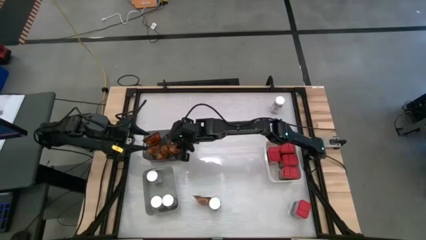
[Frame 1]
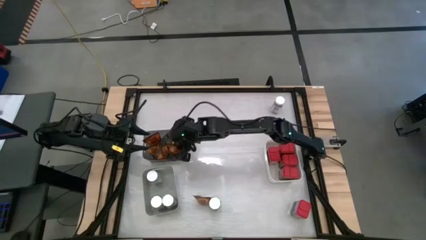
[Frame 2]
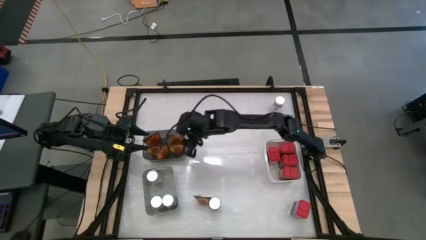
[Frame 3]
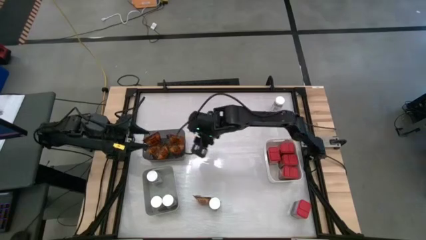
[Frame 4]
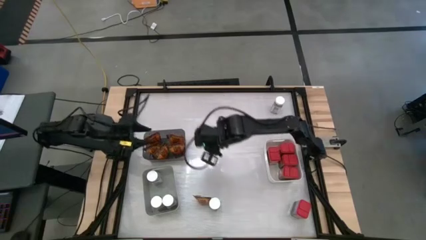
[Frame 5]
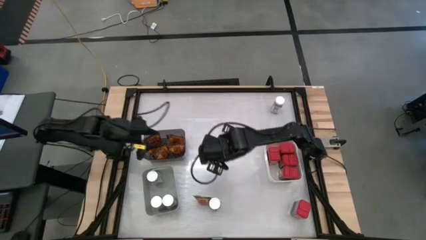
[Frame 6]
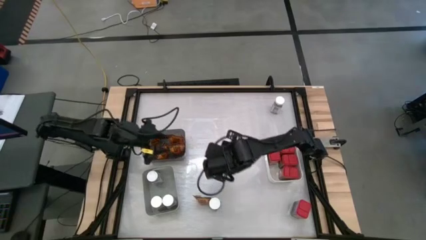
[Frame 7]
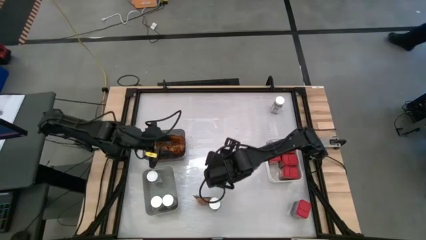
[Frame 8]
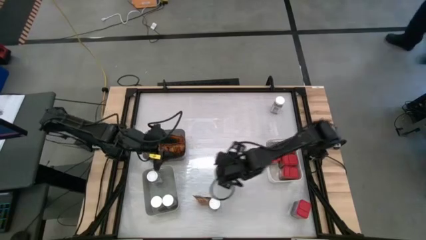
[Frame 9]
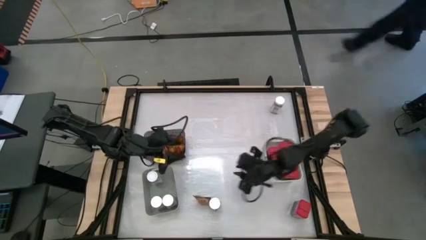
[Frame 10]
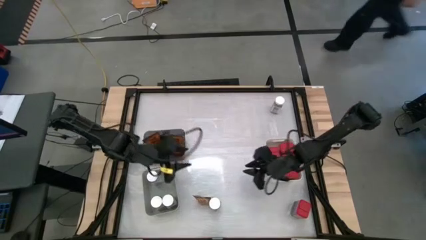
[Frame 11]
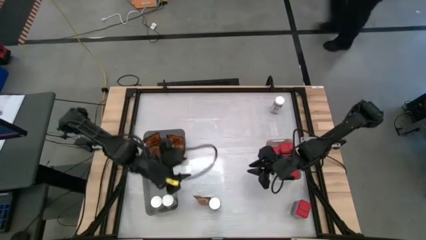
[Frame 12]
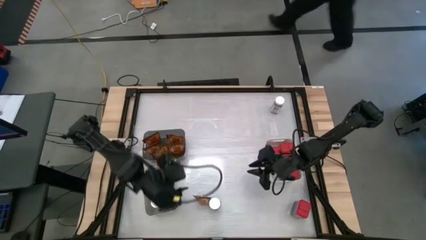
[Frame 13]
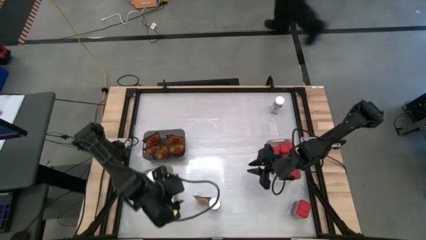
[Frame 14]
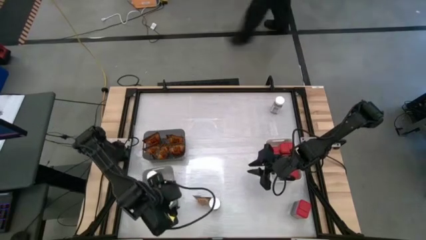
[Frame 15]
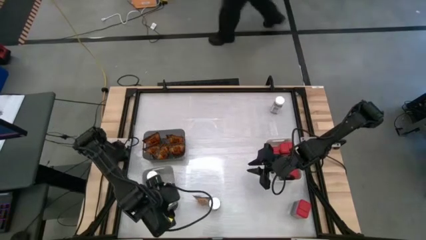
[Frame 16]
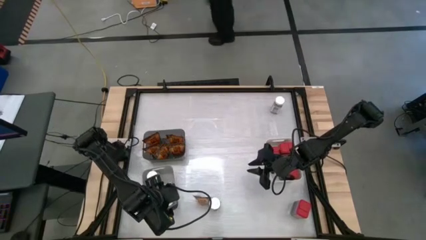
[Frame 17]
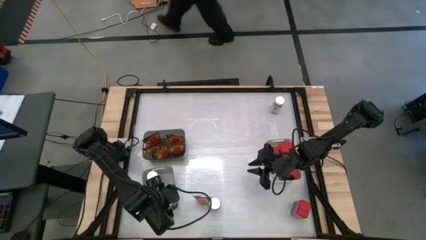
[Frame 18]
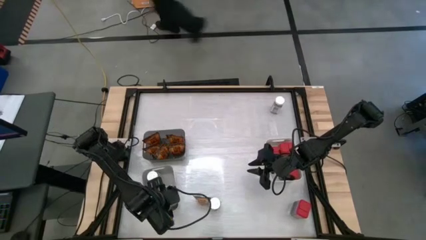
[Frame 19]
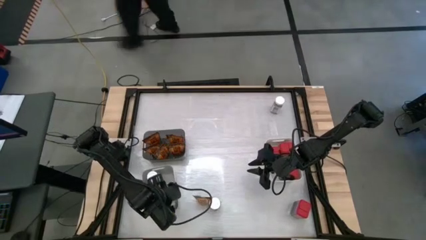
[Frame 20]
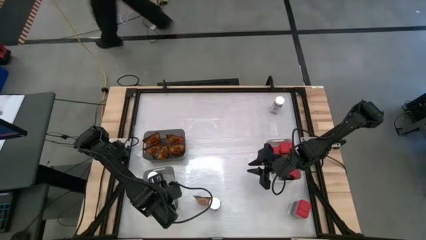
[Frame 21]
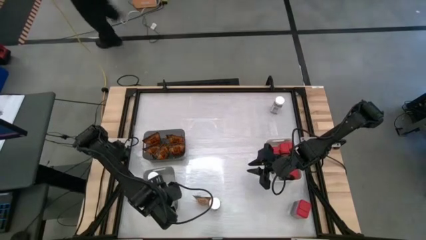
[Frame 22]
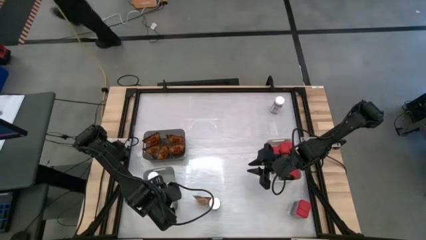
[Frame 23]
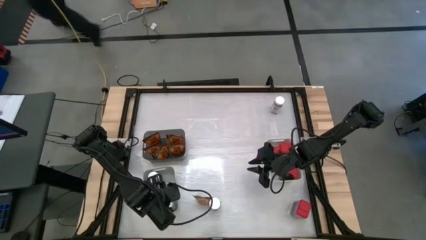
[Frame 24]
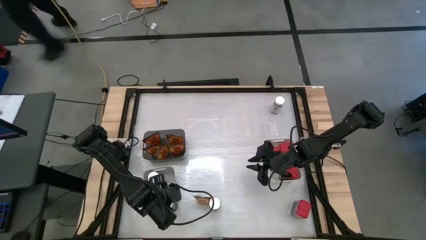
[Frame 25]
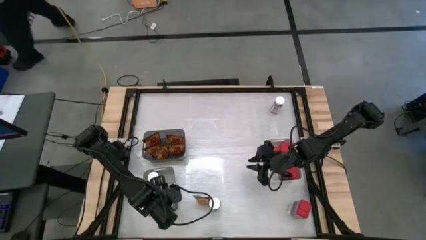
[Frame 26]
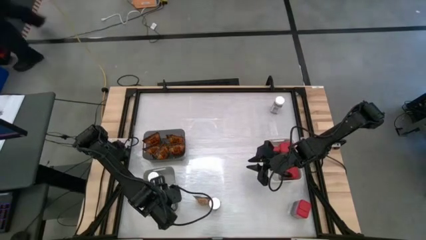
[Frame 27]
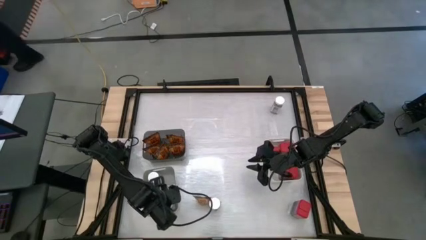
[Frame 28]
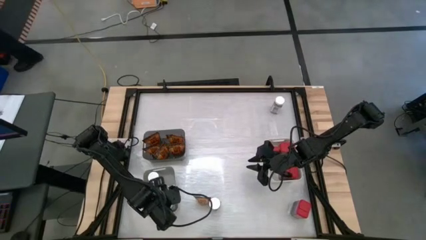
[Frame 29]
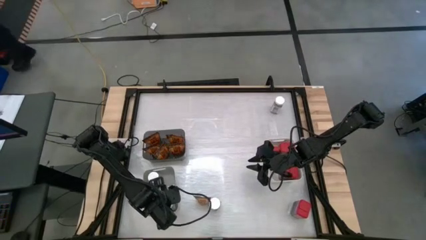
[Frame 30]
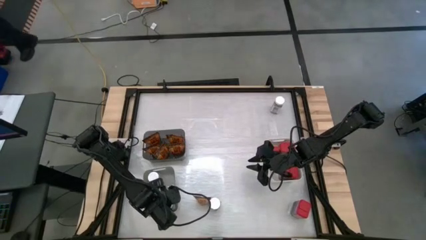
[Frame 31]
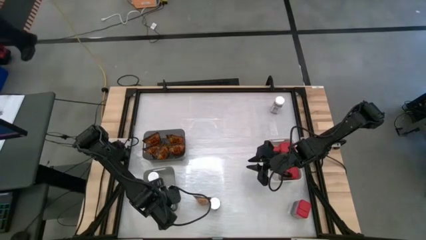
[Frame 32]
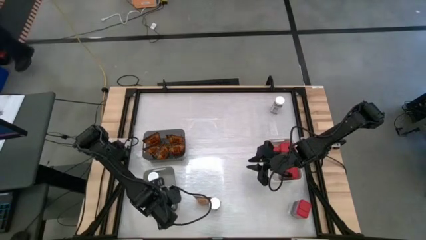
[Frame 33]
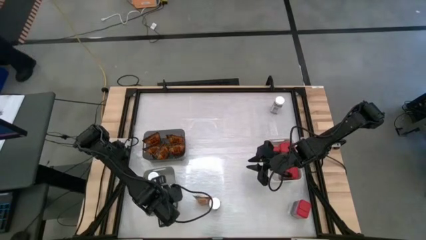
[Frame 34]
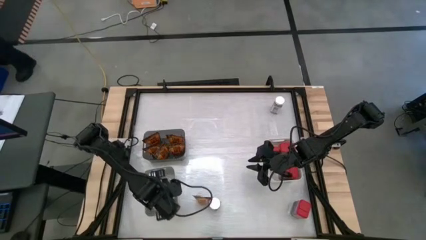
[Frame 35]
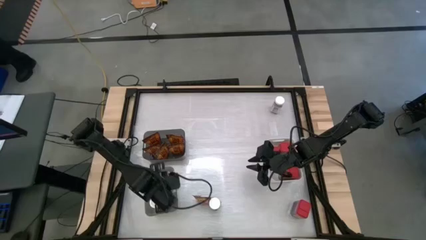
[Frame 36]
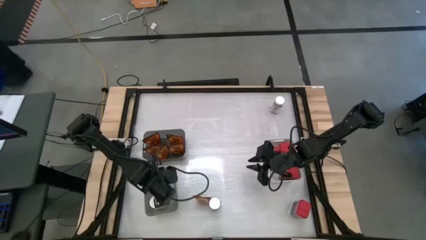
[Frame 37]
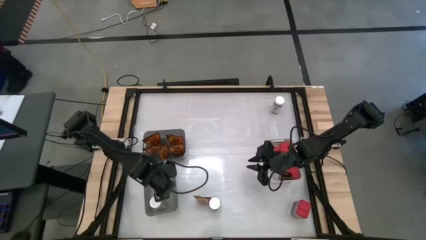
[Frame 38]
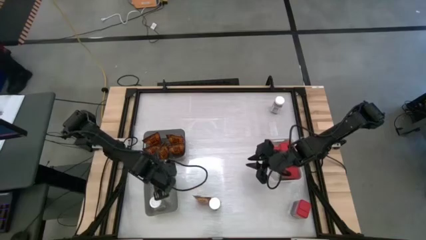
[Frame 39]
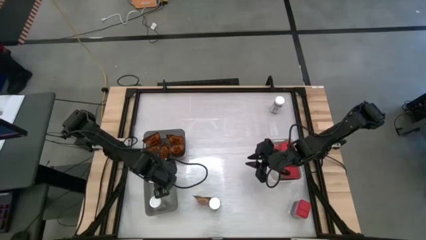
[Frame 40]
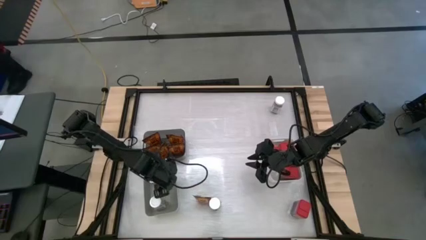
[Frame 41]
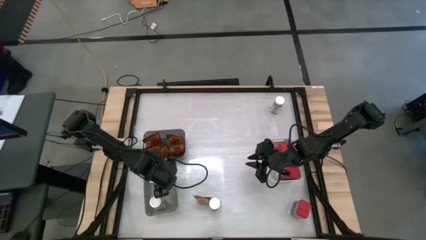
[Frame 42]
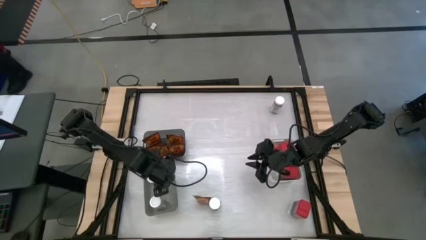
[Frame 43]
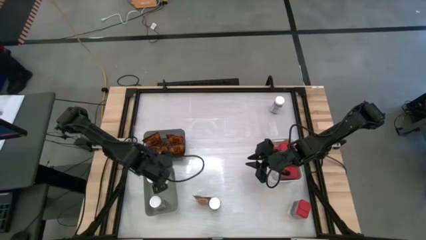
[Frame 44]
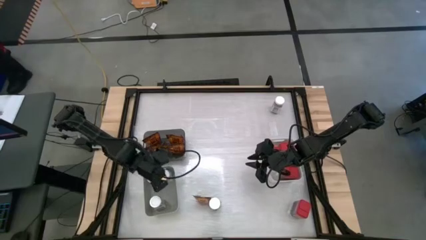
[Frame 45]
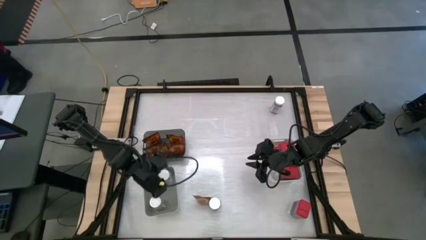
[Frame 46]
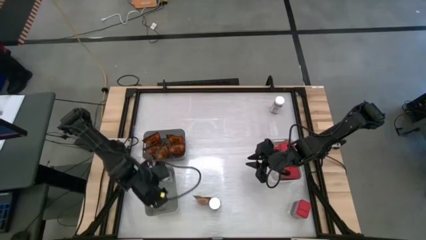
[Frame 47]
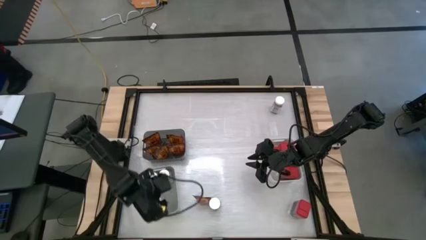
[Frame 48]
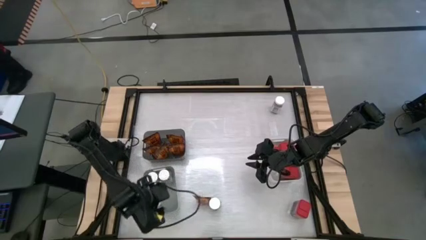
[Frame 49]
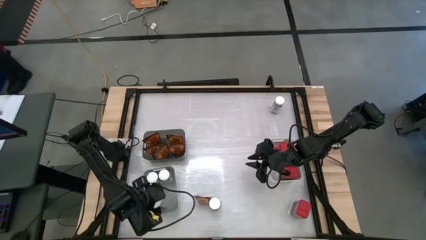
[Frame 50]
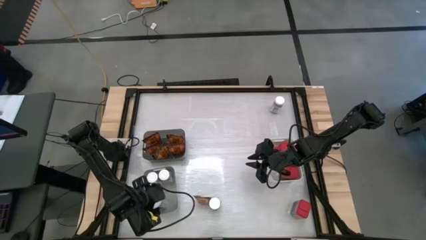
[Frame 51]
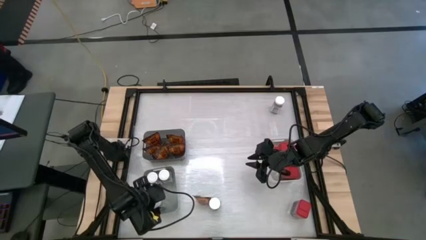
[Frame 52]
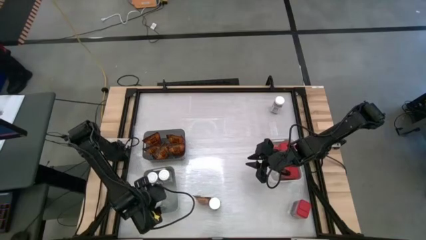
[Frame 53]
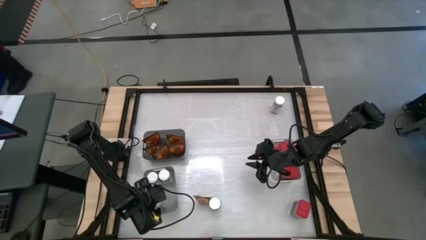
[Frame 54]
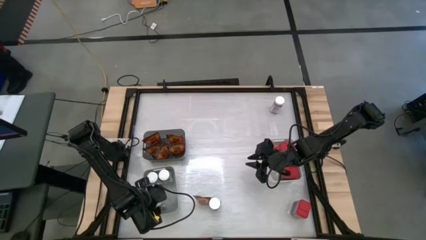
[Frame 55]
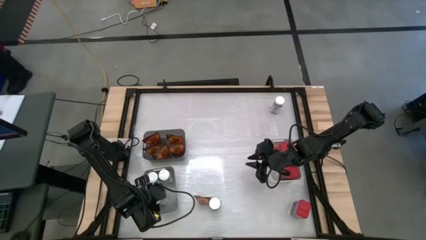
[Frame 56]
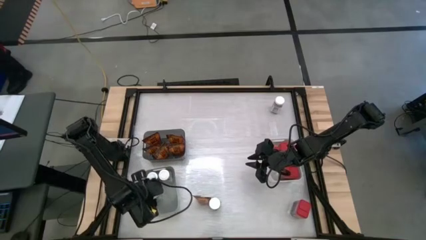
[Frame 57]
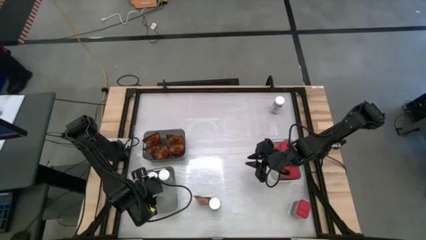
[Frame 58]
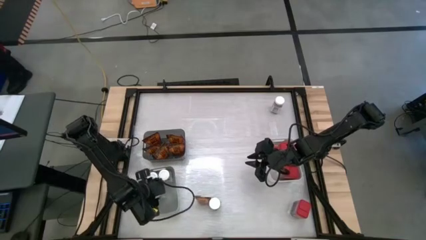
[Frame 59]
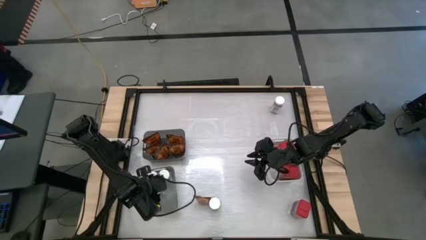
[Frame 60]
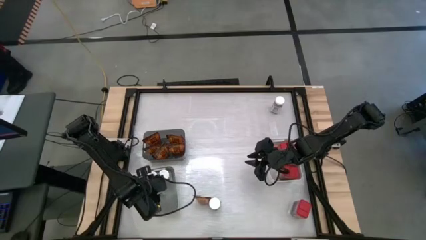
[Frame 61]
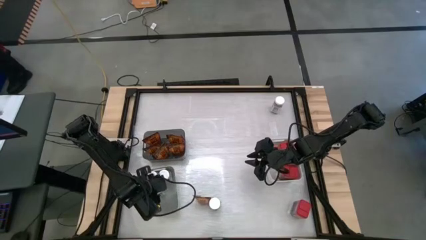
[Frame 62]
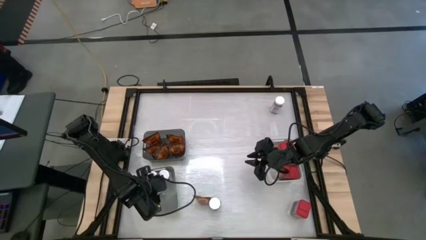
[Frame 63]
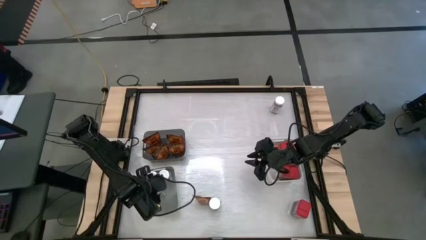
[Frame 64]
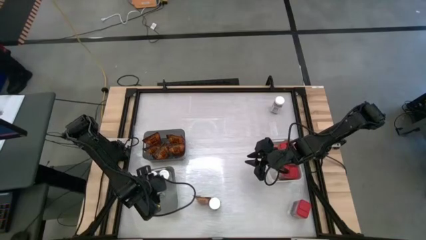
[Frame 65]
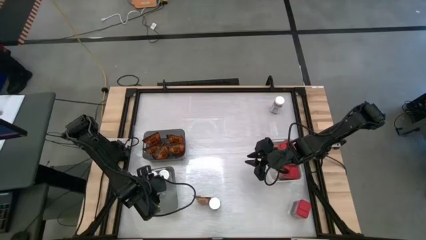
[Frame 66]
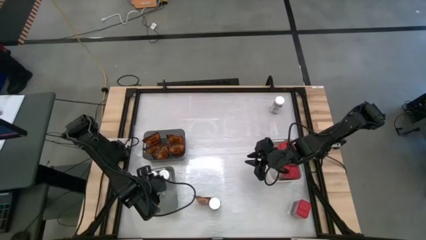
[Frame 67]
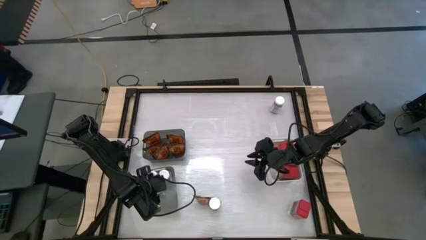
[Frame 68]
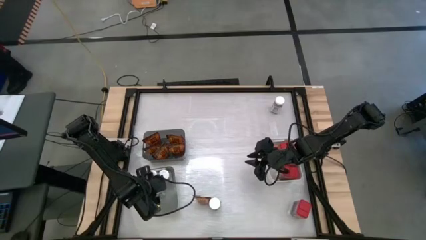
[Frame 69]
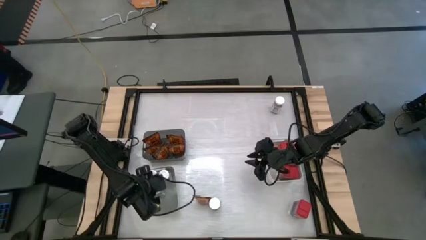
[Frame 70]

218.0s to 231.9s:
Task: Sort spices by type
Adjust the white spice bottle inside the gray bin
